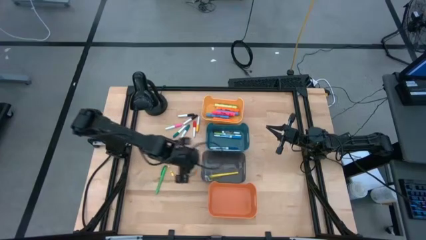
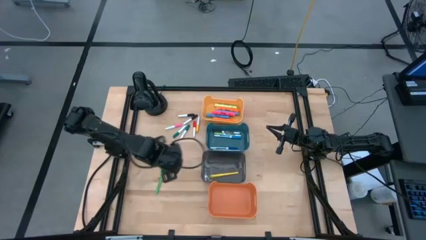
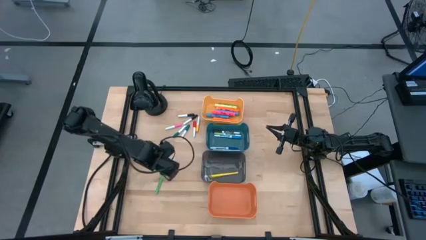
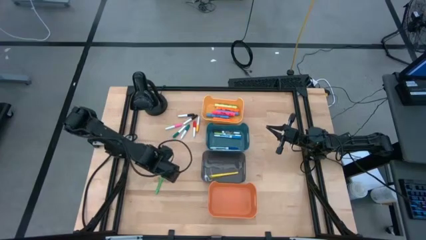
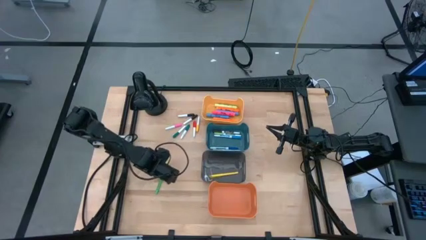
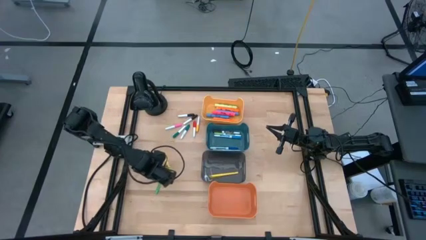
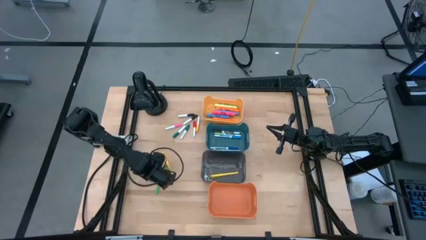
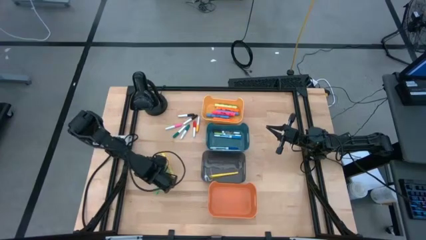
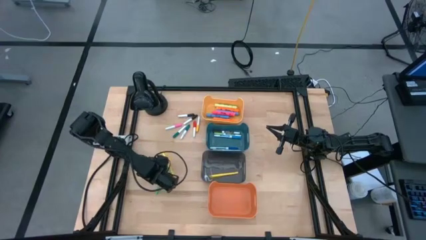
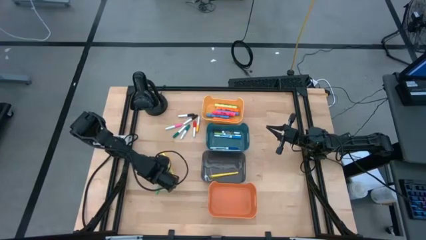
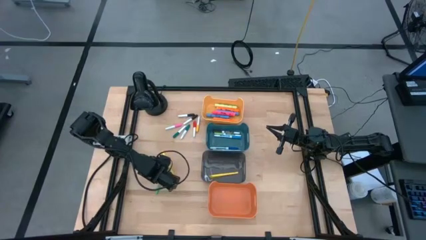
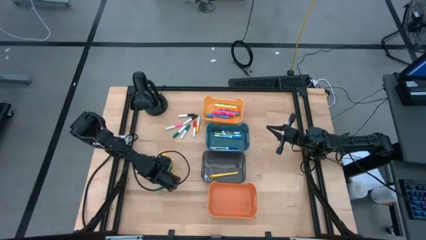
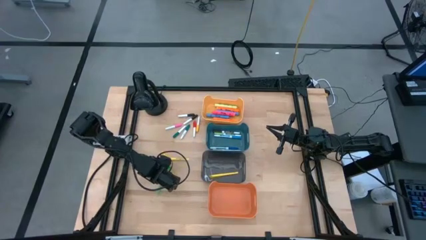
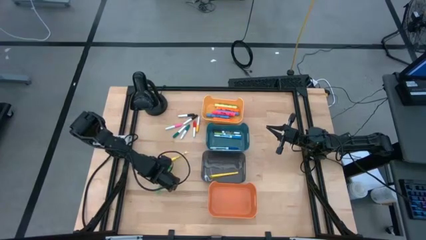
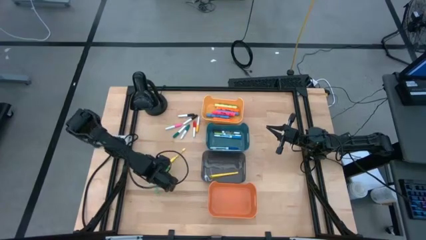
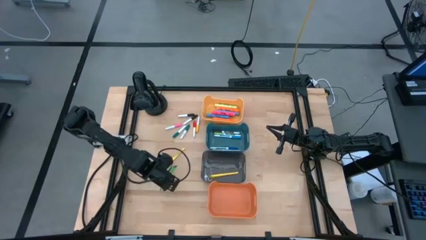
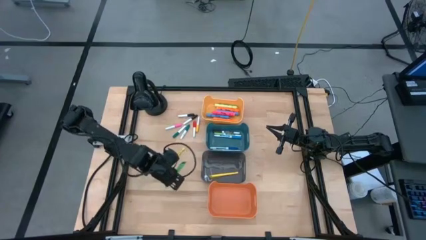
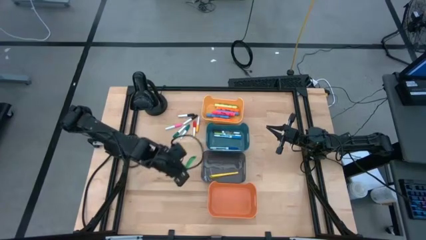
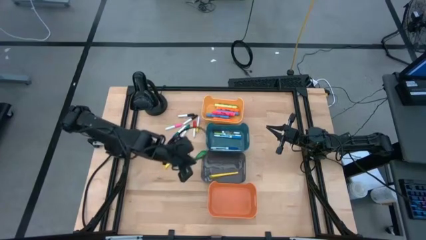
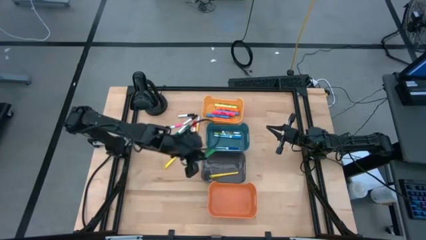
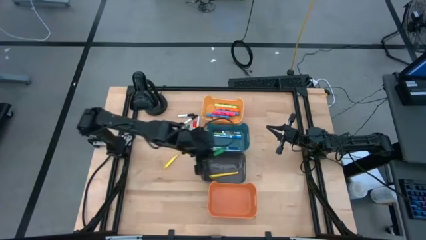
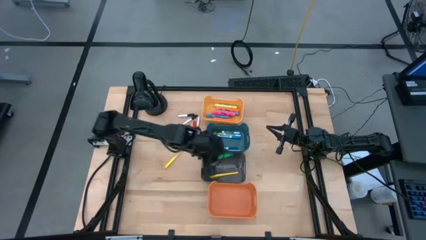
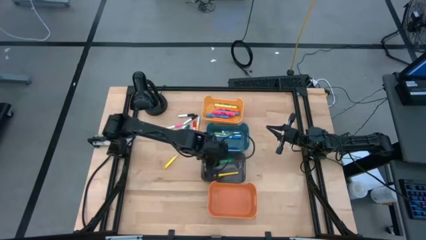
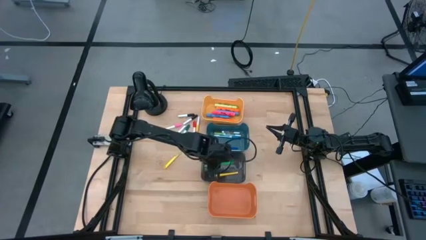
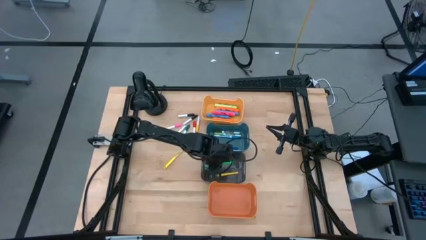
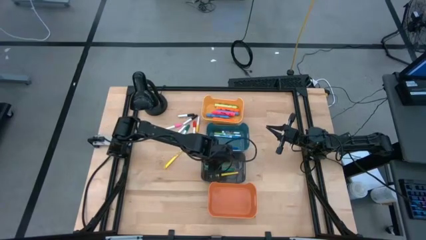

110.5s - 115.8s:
Task: Pick & Place Markers
Put the green pen into the gray bin

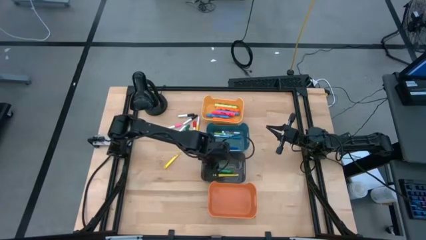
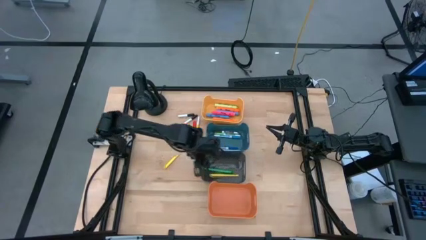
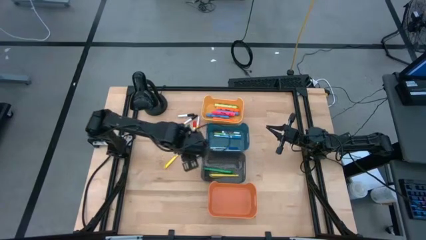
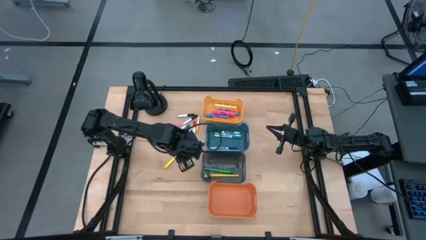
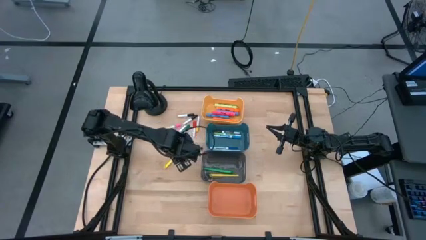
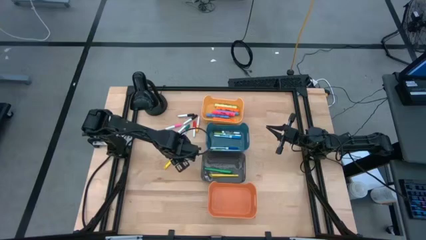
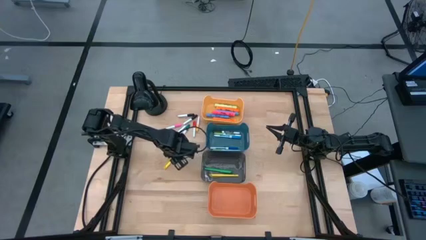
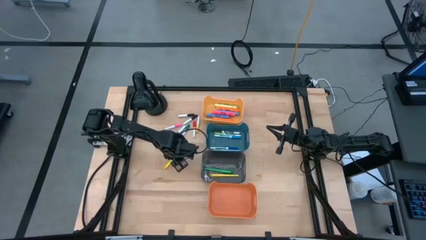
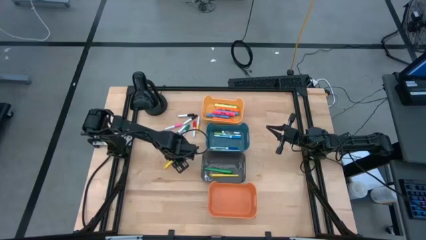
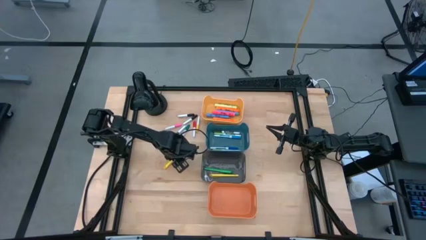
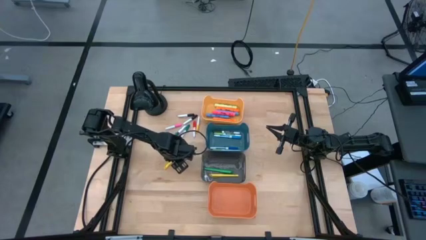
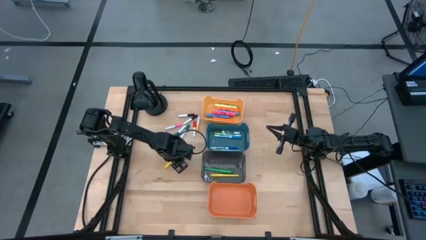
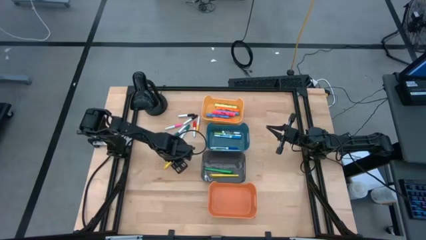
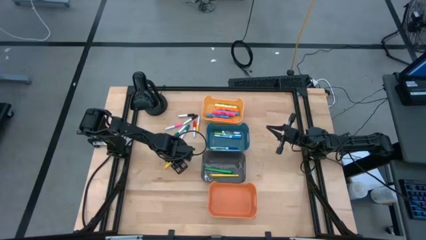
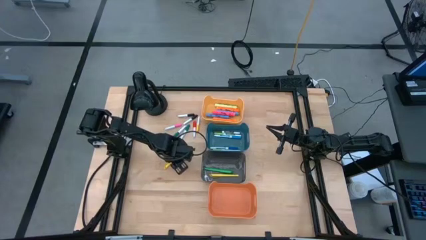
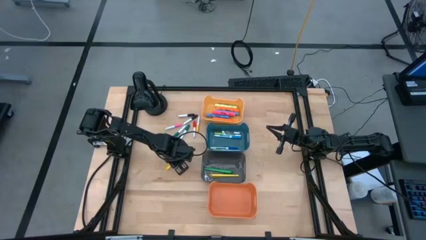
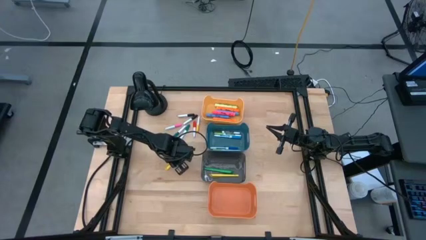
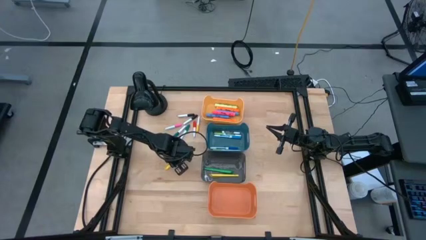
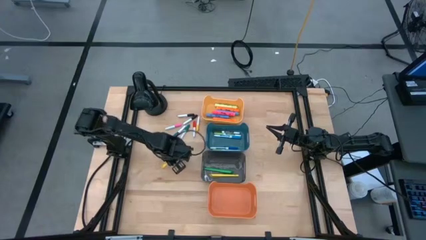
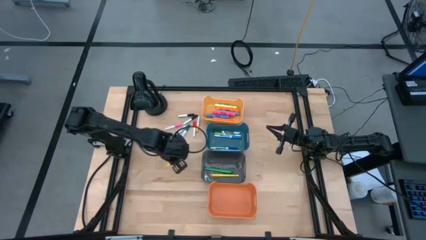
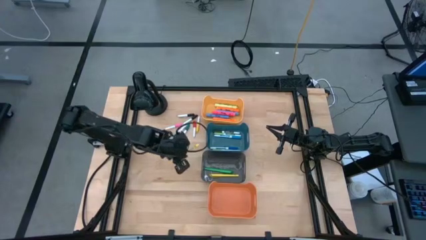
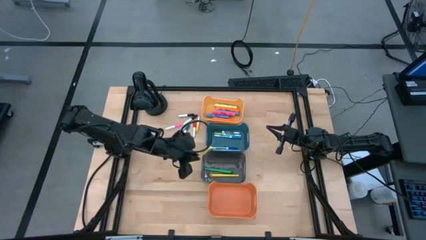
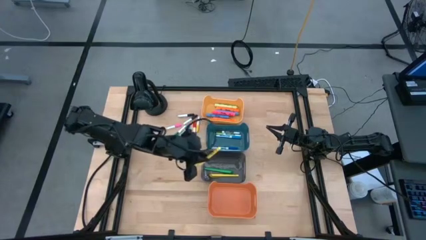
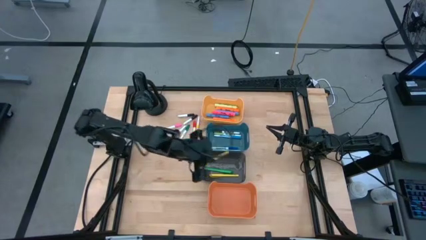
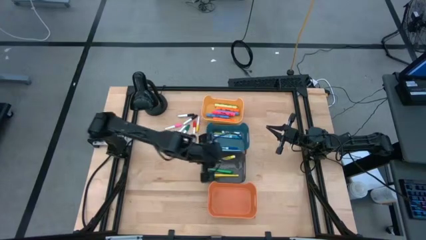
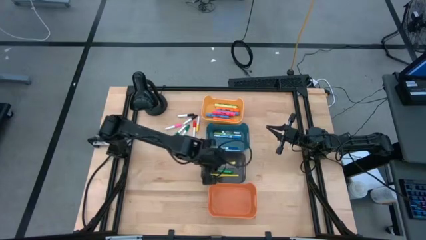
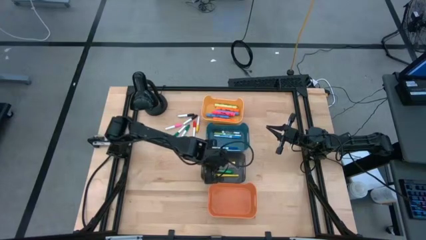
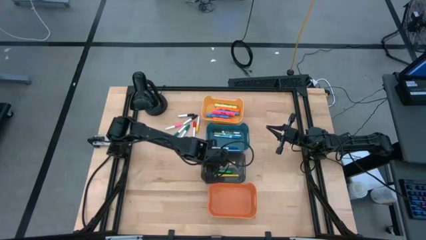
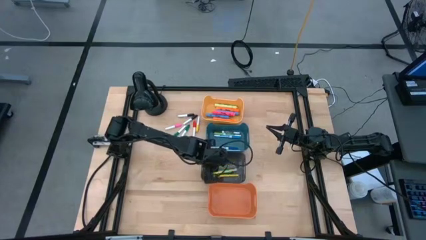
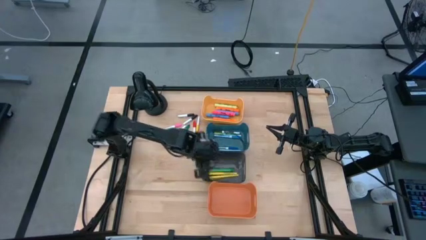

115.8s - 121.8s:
Put the yellow pen into the gray bin

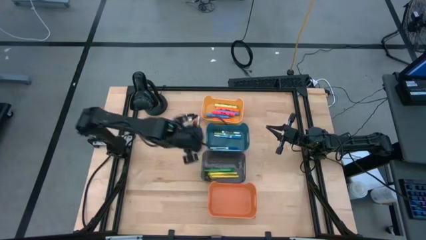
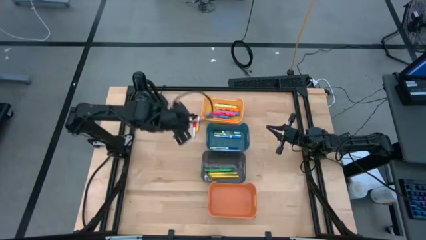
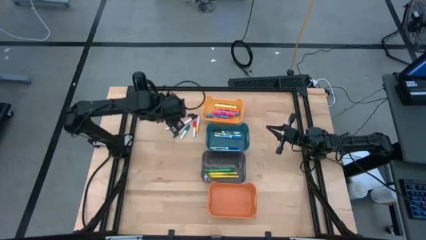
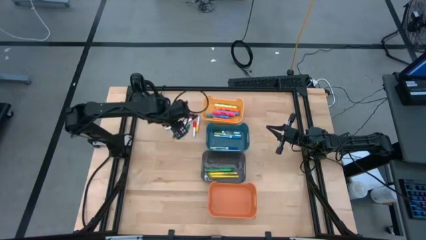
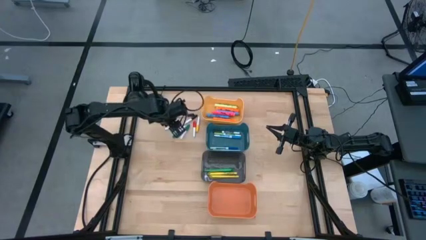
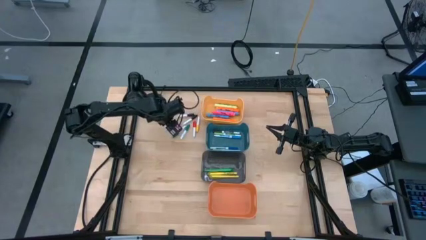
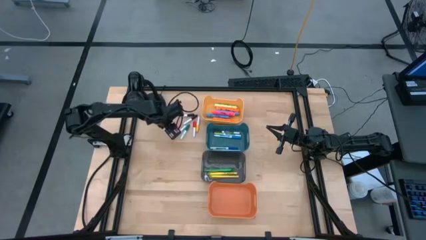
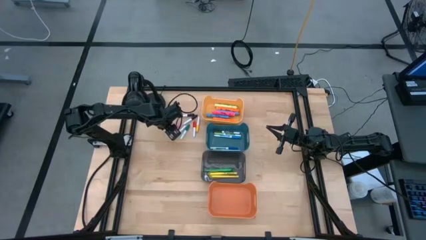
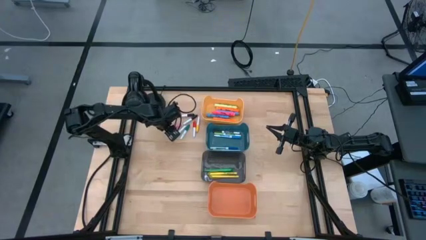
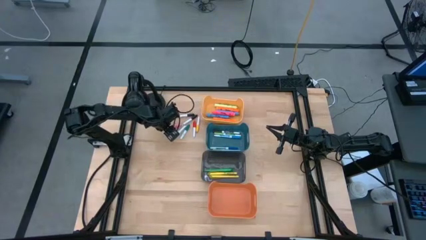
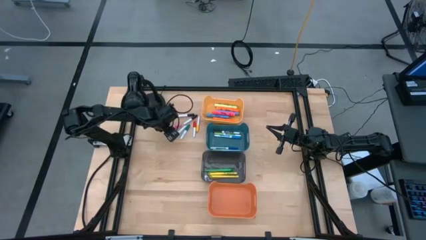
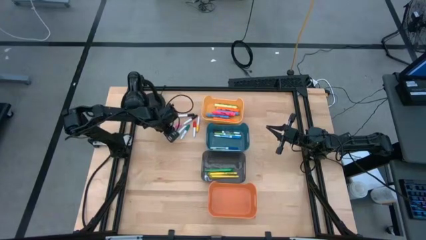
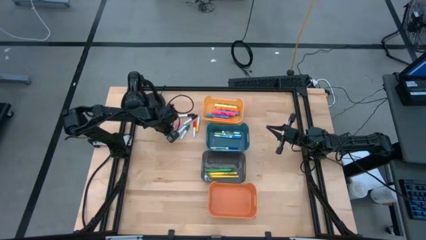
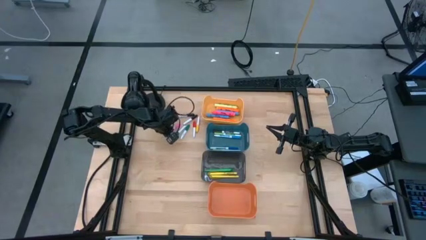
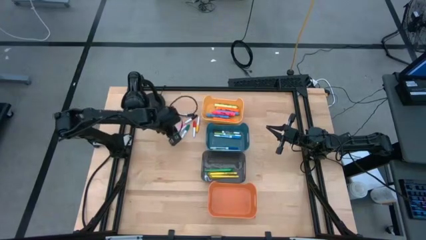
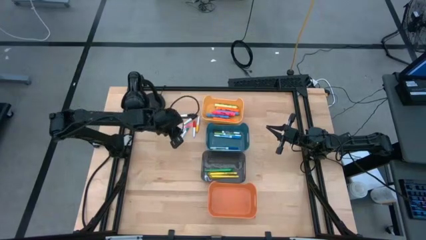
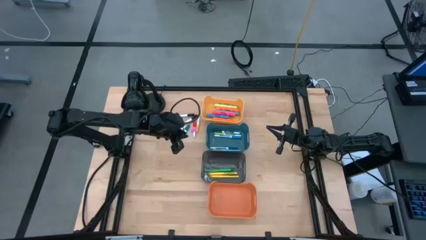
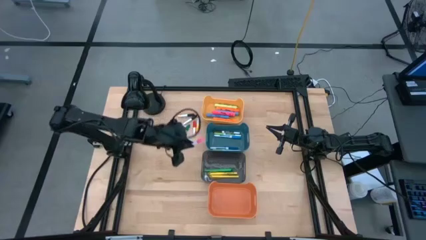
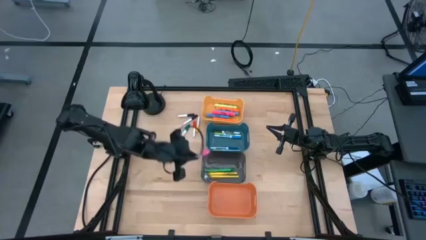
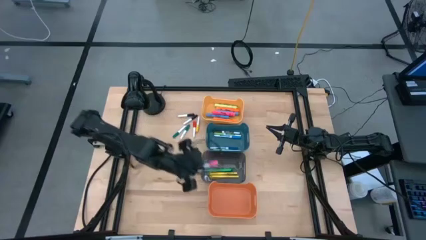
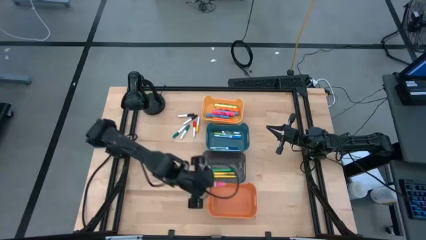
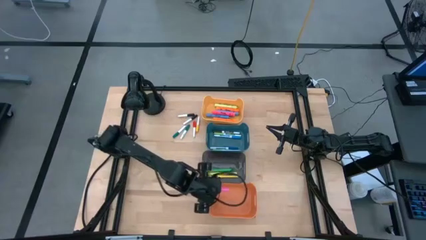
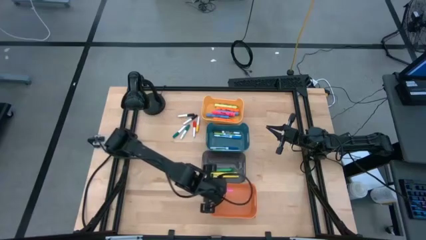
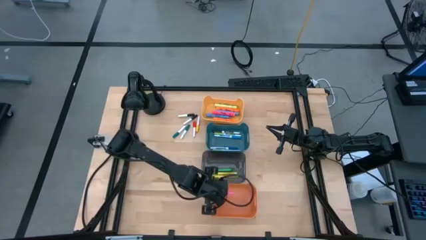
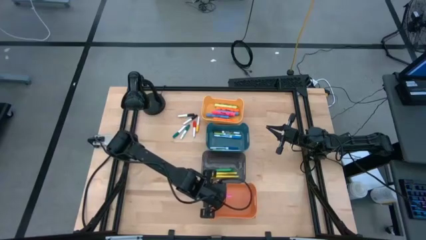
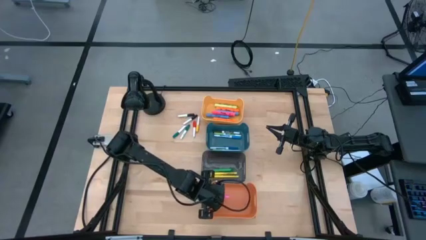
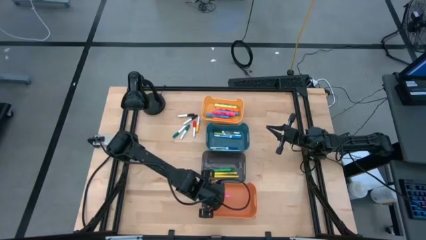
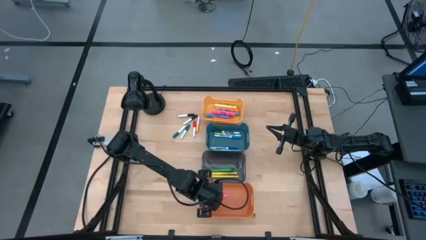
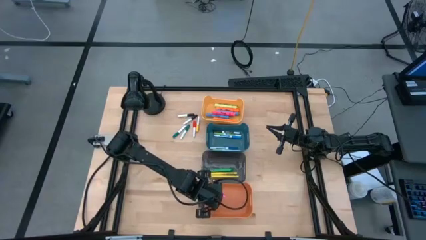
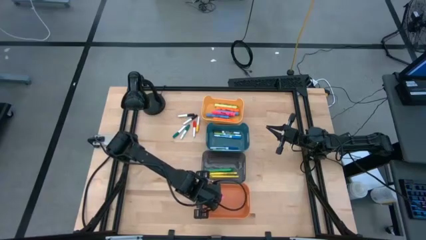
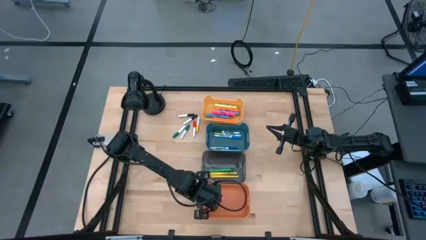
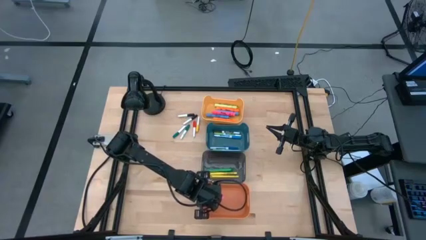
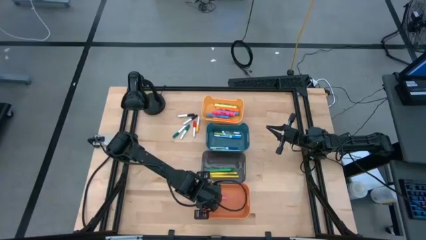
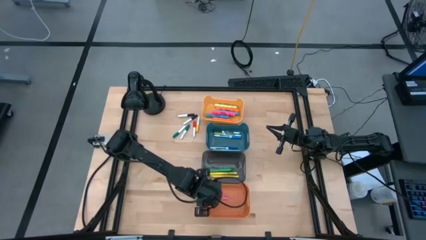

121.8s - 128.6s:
Put the pink mini marker into the orange bin
